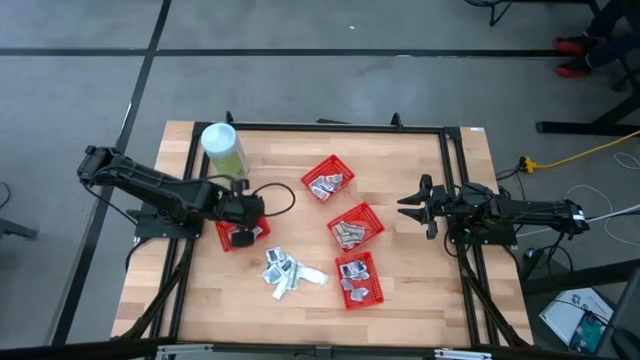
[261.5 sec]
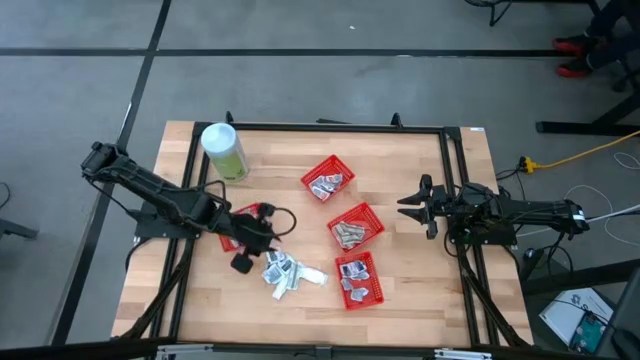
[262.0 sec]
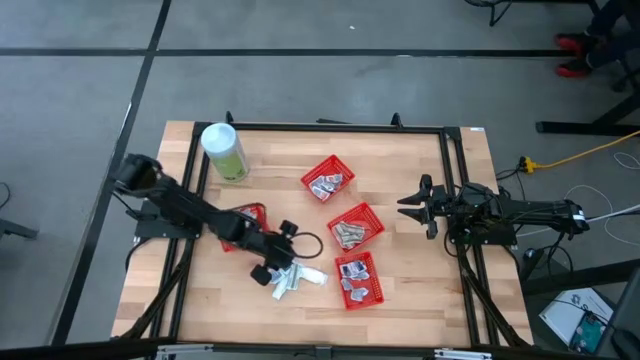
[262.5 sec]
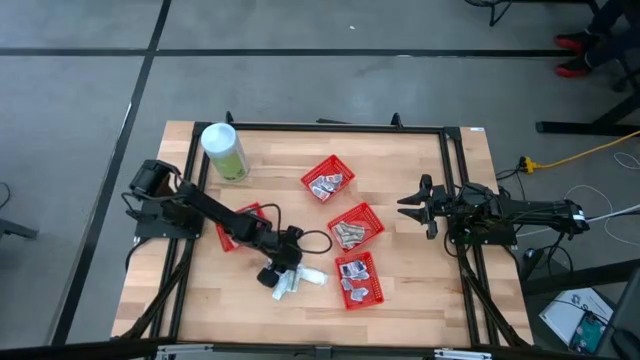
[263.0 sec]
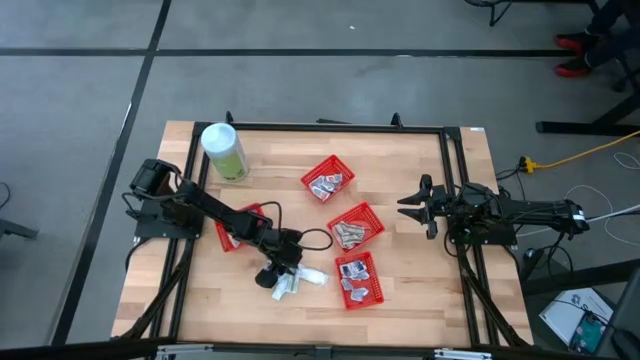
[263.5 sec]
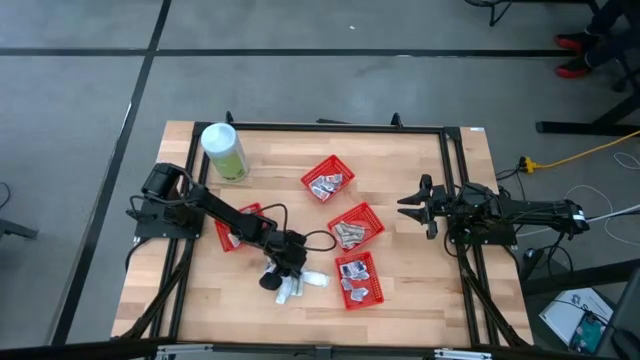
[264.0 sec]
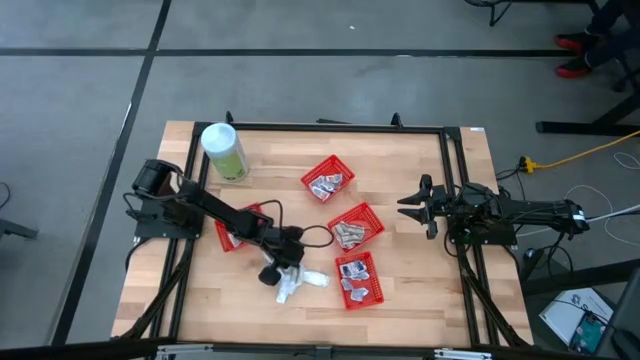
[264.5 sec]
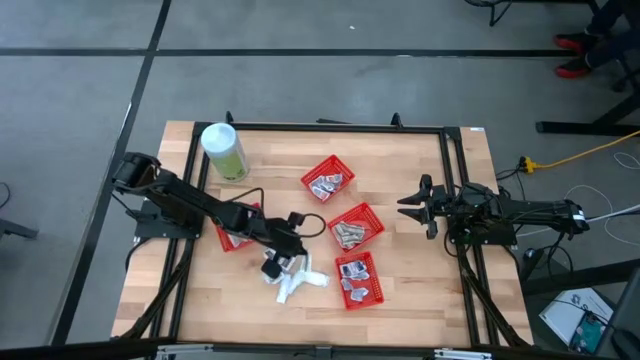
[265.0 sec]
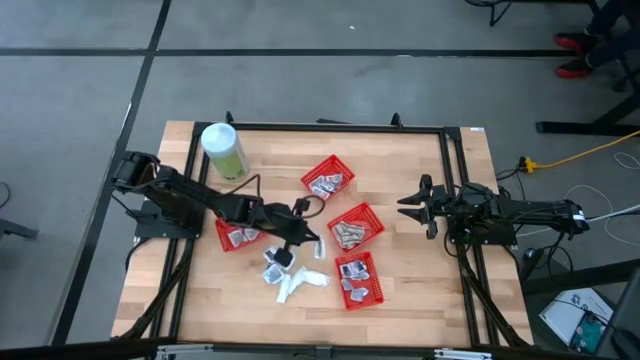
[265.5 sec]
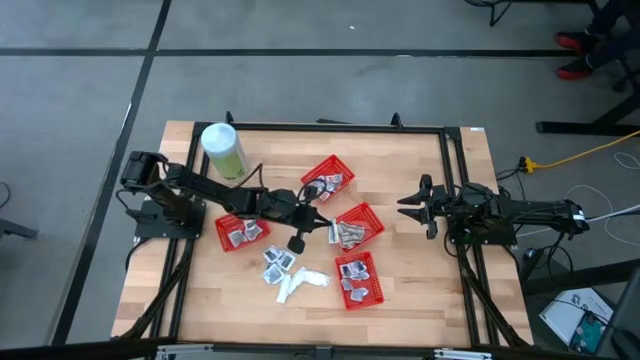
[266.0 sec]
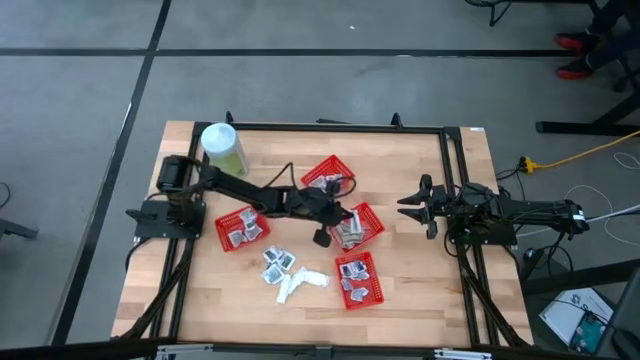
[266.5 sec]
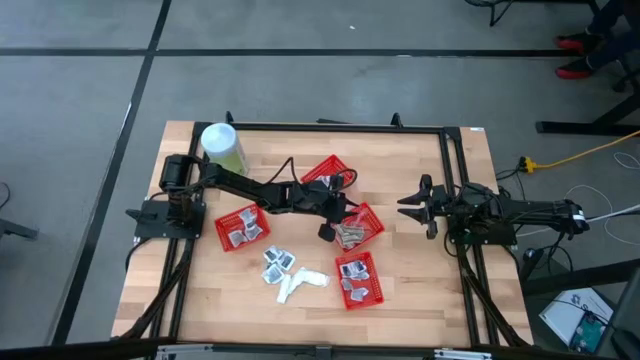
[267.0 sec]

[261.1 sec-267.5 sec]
Task: Pick & Place First Aid Supplies
Put the green bandage into the red container

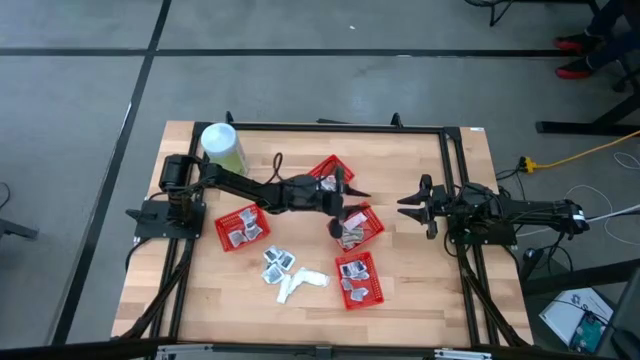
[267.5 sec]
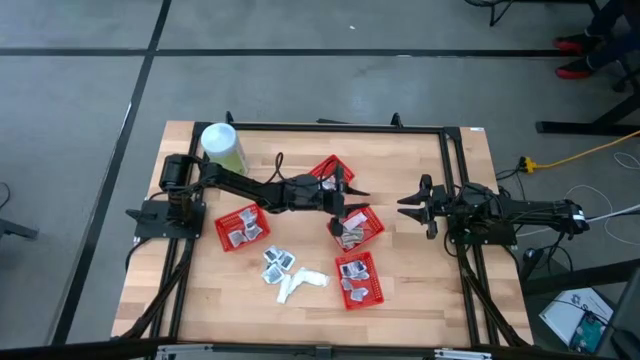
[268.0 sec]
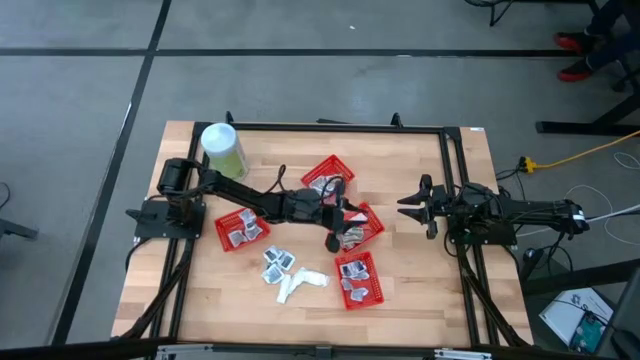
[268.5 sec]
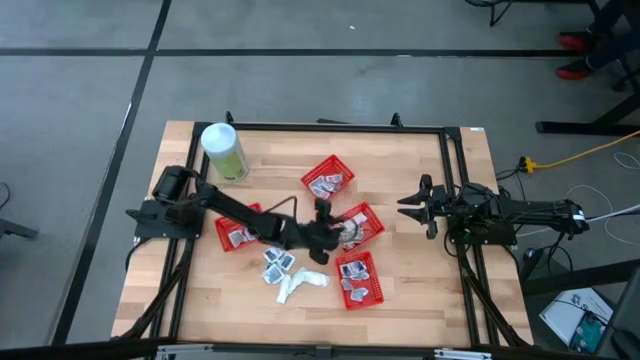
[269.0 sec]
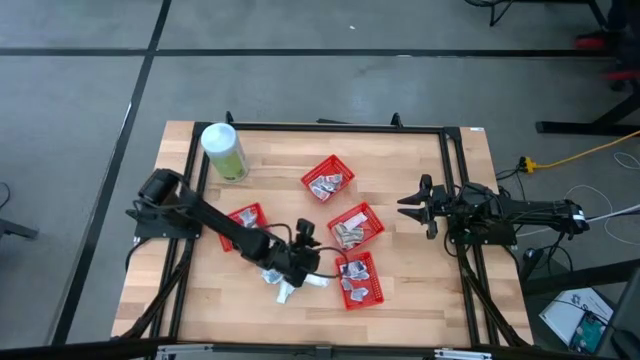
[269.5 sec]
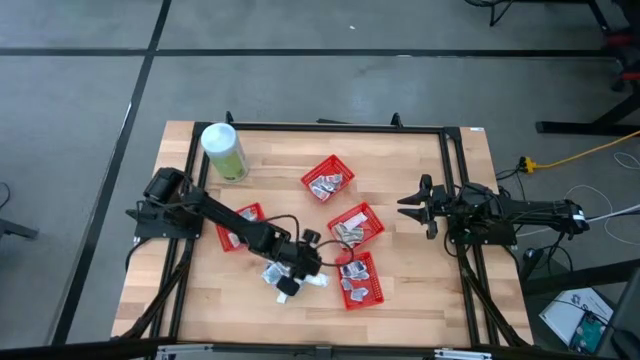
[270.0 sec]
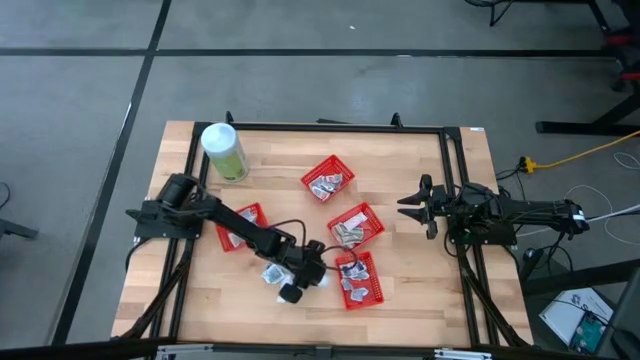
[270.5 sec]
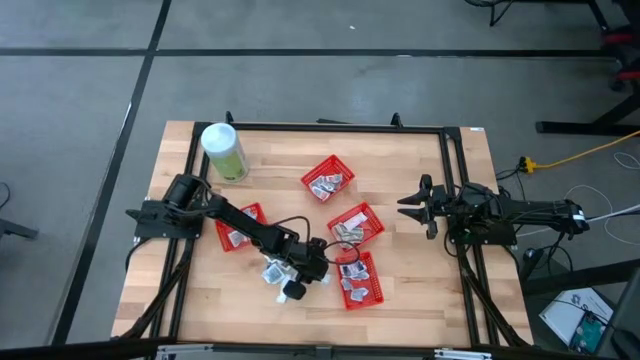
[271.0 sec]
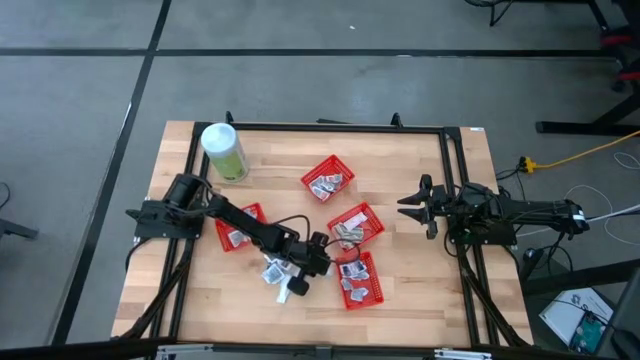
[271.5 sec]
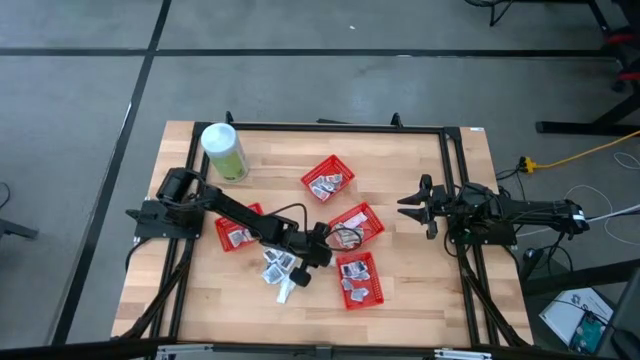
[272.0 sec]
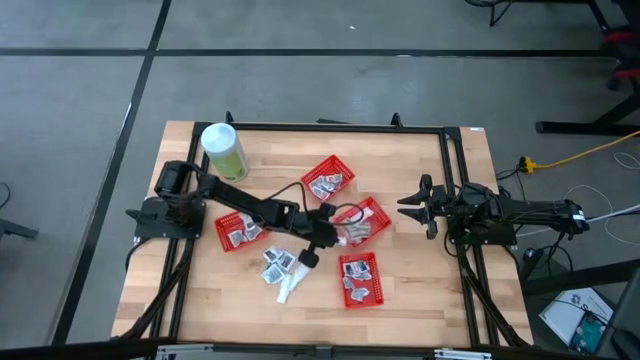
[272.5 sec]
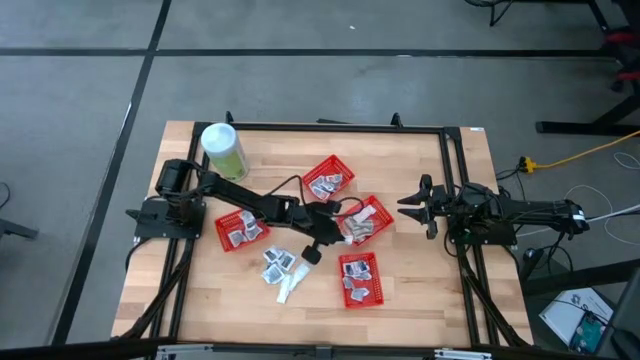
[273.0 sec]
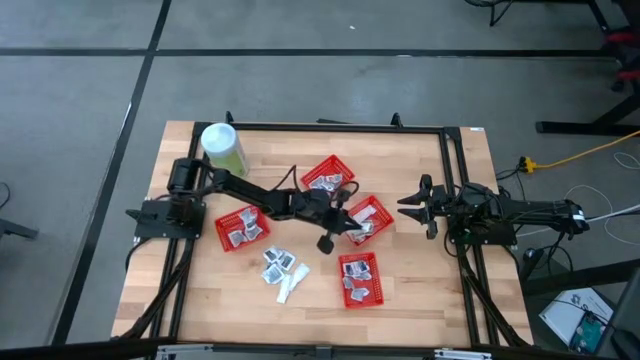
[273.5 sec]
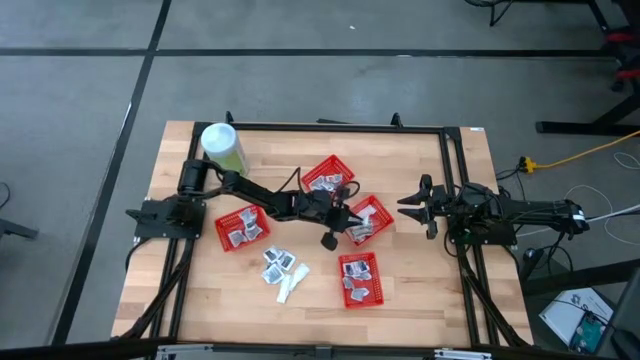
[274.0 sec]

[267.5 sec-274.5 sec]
Put the green bandage into the red container

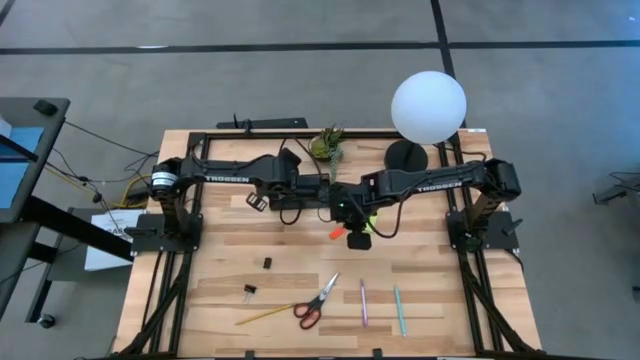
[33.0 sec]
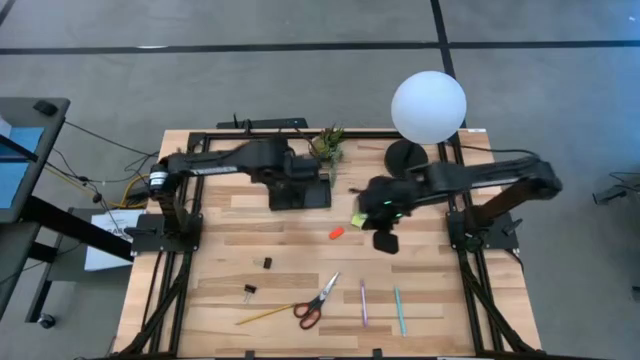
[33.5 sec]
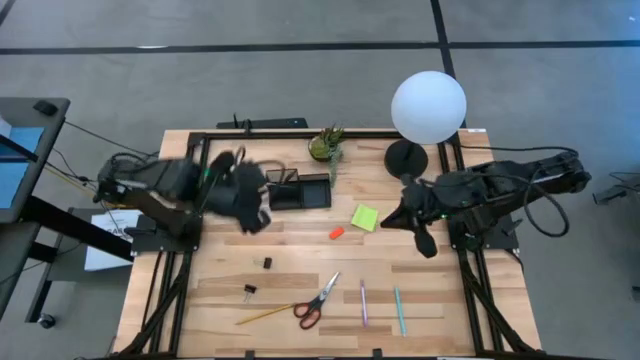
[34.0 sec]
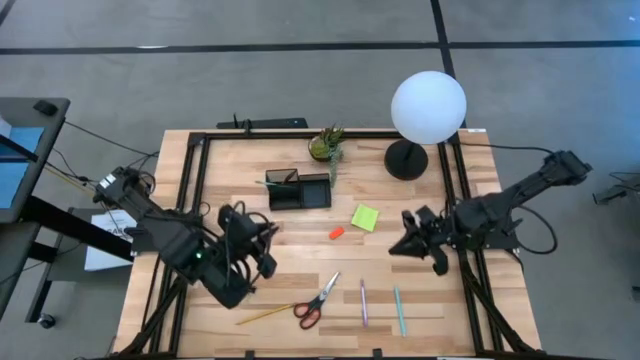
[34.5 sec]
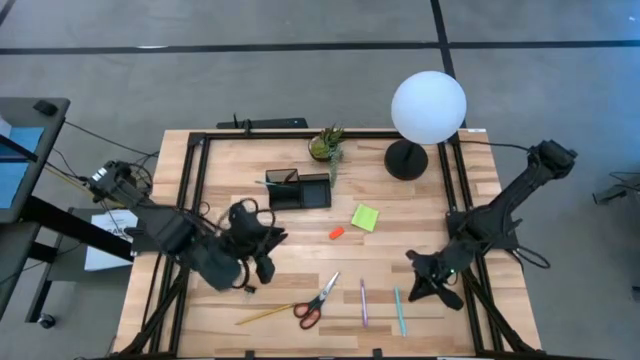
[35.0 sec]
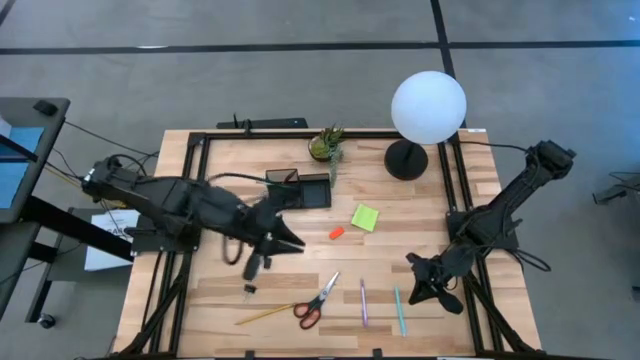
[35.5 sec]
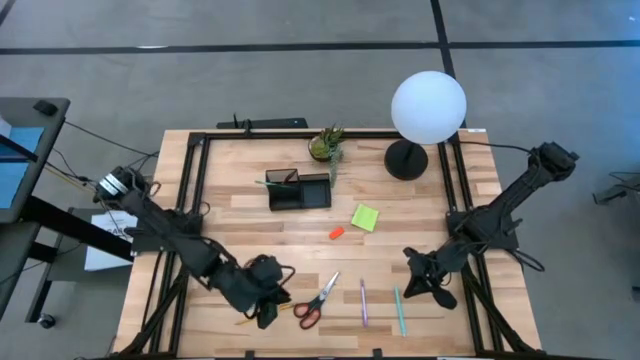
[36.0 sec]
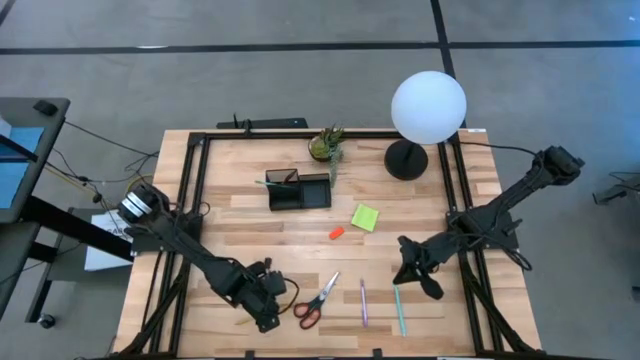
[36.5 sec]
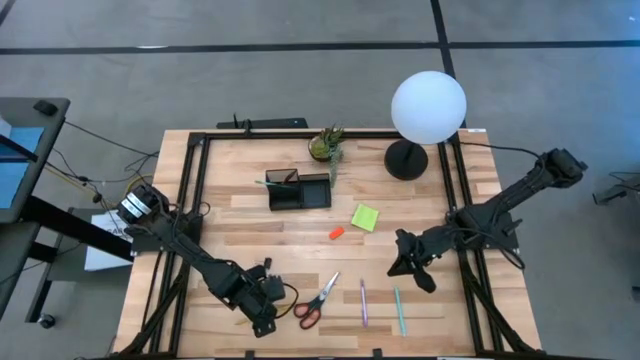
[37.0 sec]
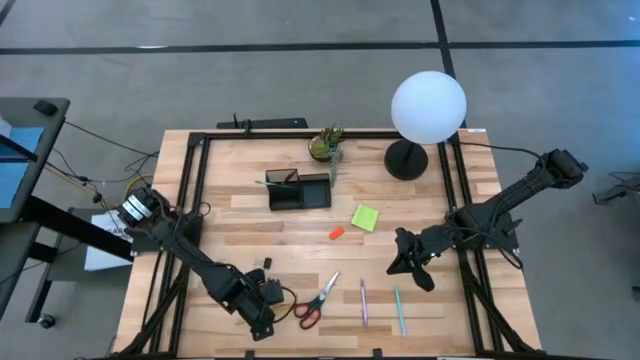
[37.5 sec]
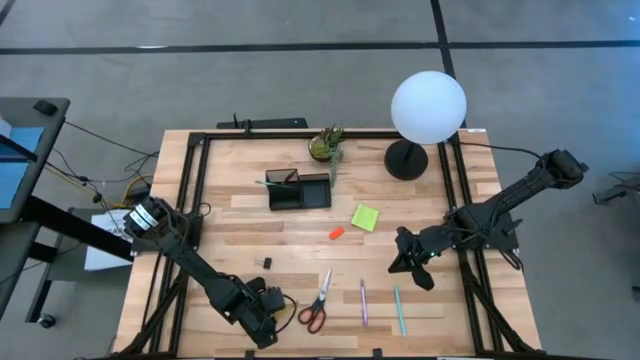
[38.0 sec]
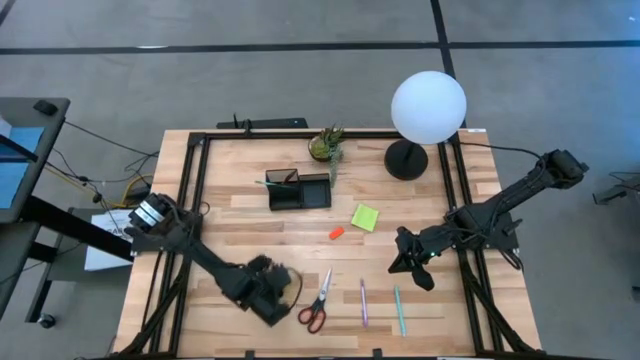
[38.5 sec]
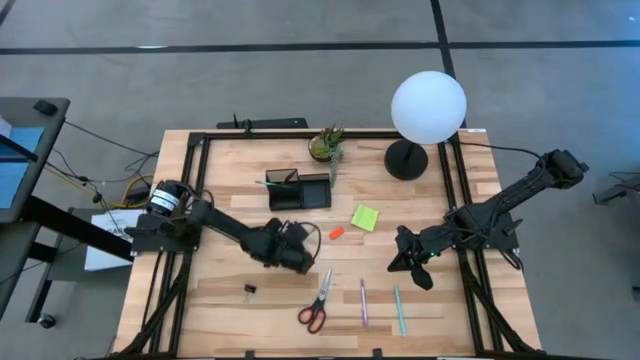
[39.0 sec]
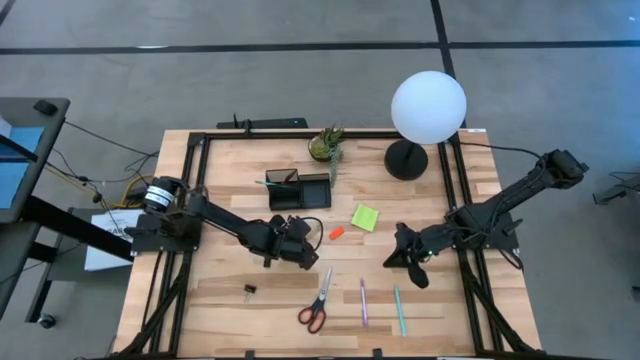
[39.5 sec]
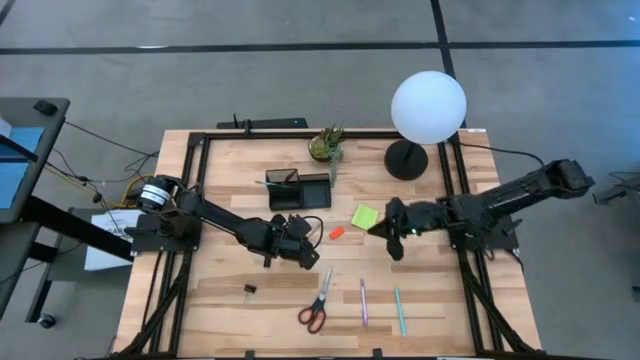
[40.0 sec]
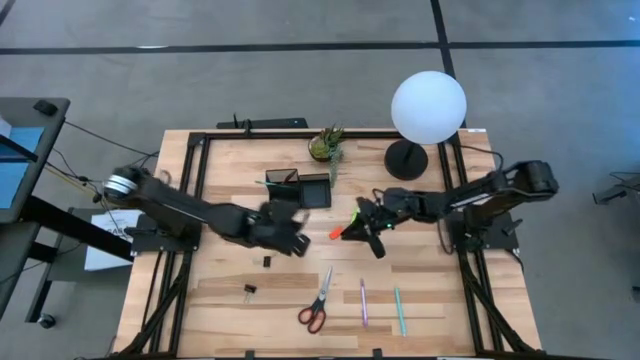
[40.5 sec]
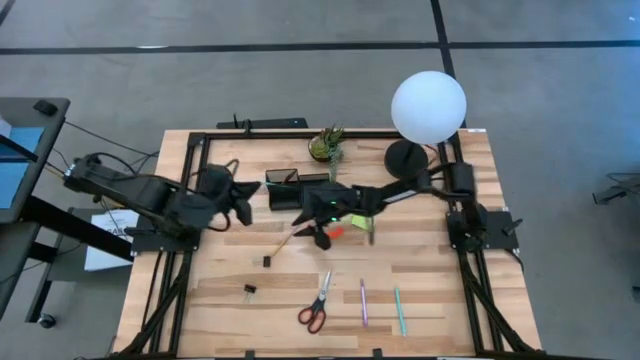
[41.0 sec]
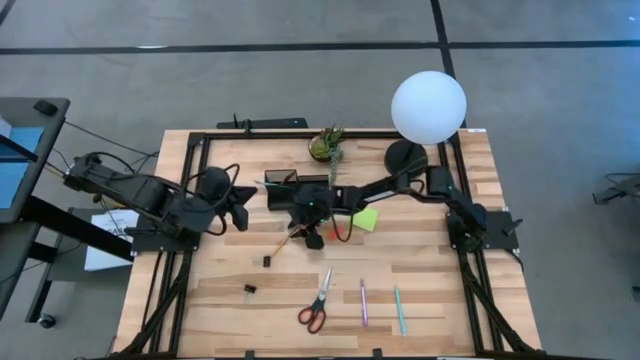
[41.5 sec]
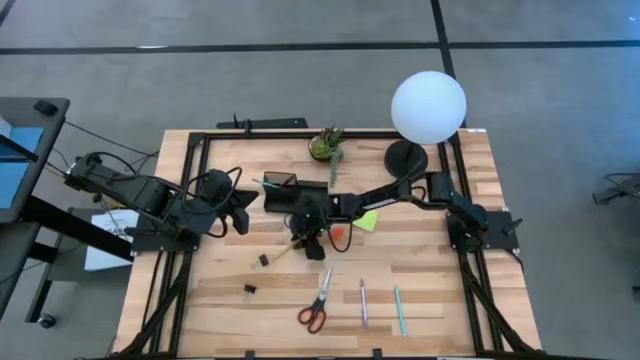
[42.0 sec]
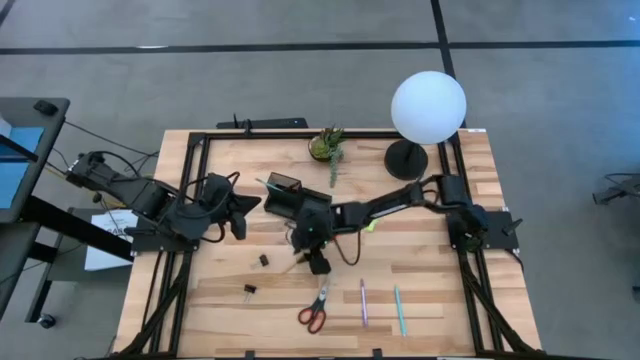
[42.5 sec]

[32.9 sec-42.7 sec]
Task: Pick and place office supplies into organizer
Put the yellow pencil into the black desk organizer
